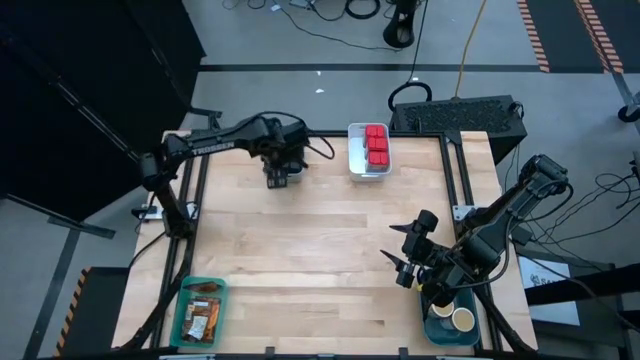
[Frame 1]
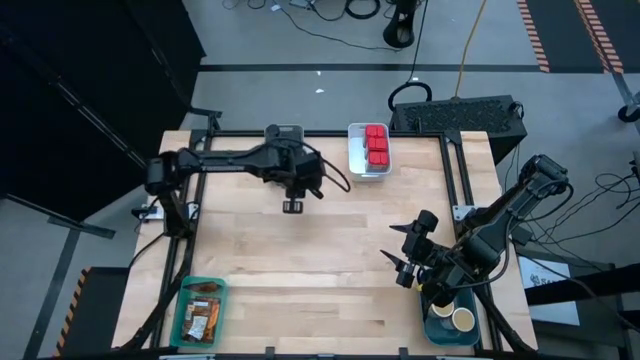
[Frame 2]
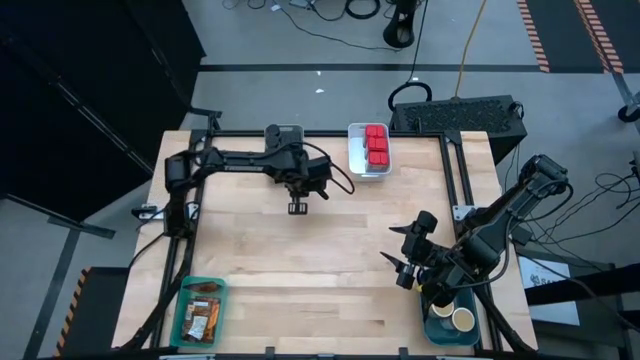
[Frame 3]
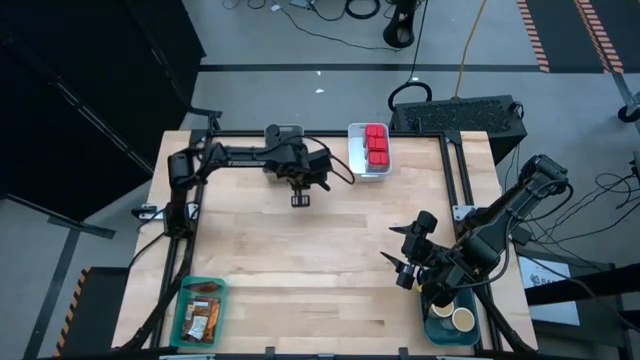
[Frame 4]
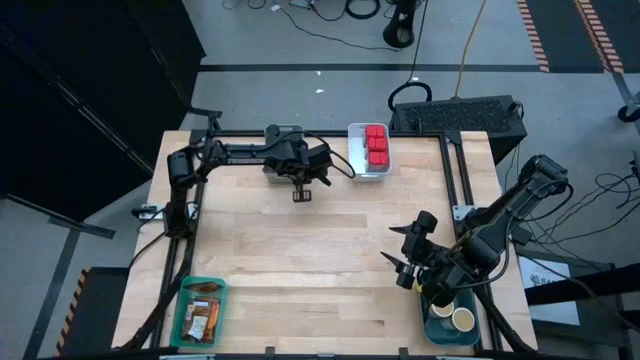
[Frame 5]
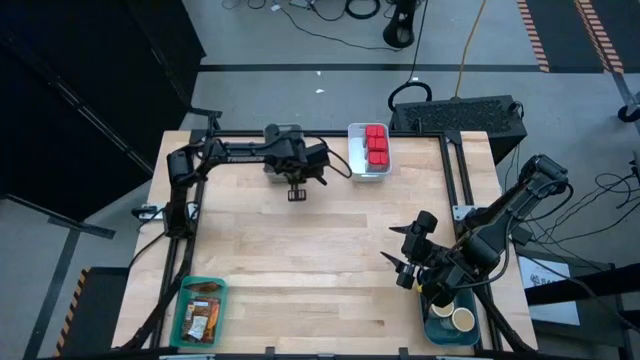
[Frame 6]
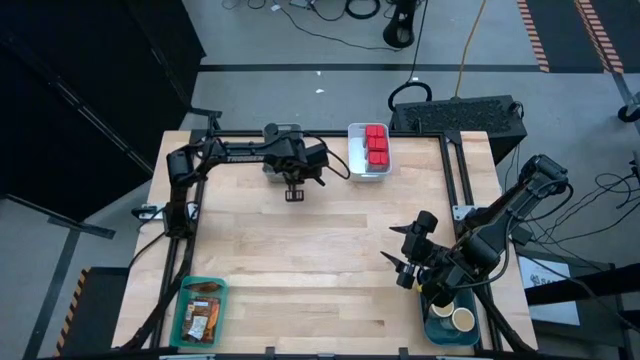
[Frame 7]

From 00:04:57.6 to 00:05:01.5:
Task: Sort spices by type
Adjust the gray bin

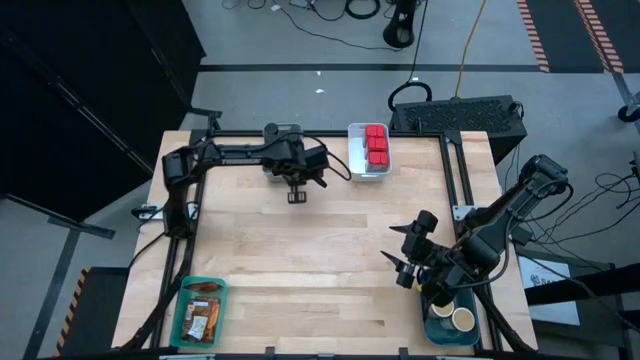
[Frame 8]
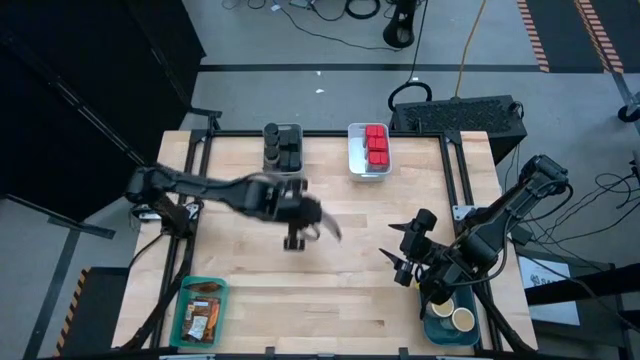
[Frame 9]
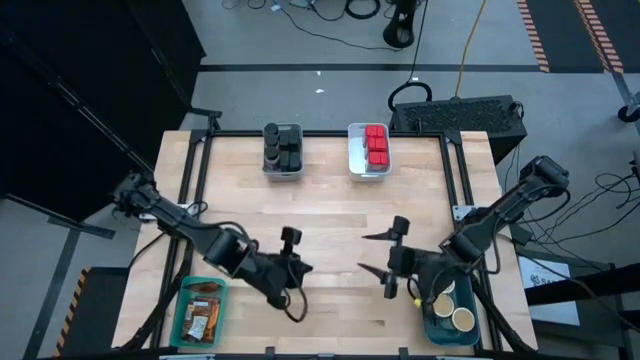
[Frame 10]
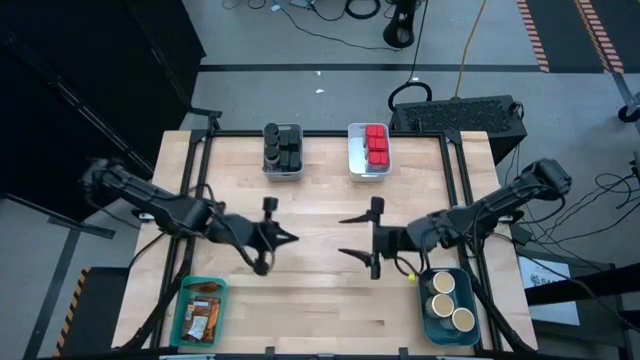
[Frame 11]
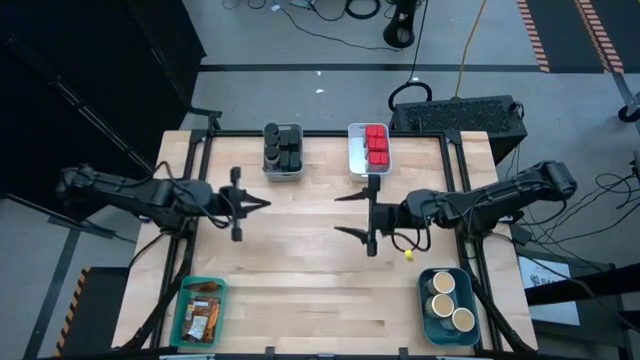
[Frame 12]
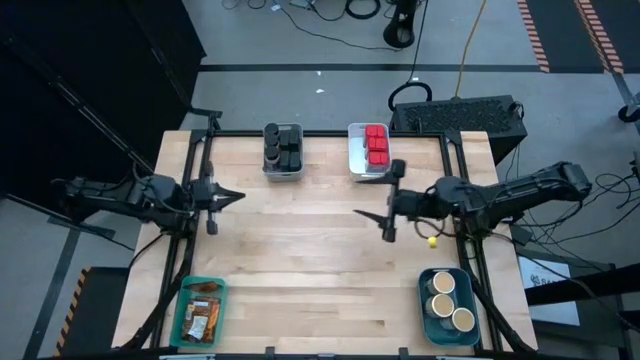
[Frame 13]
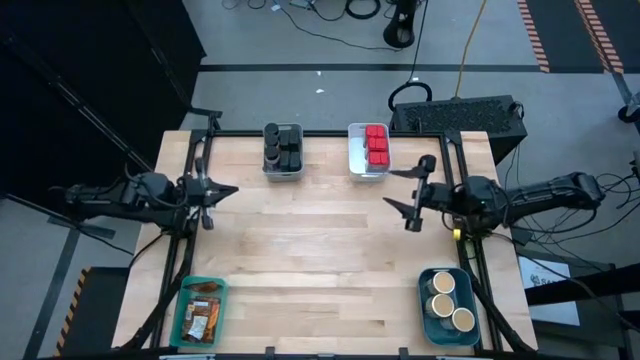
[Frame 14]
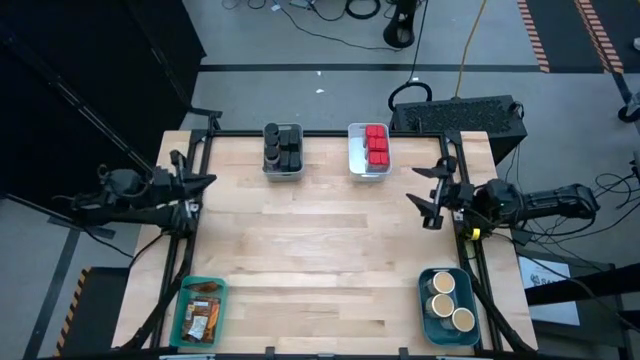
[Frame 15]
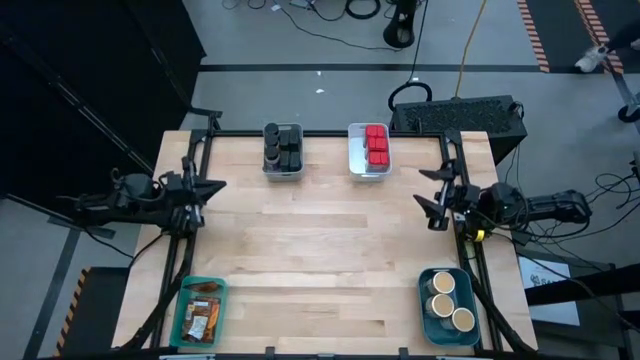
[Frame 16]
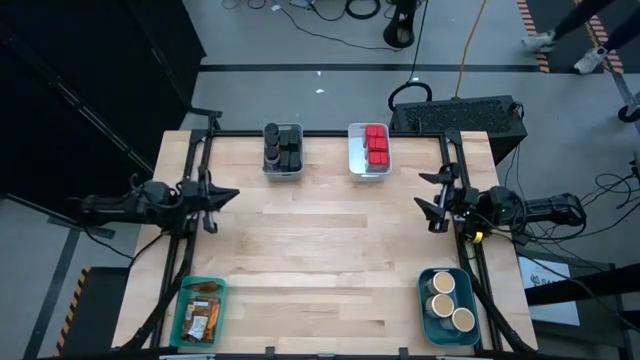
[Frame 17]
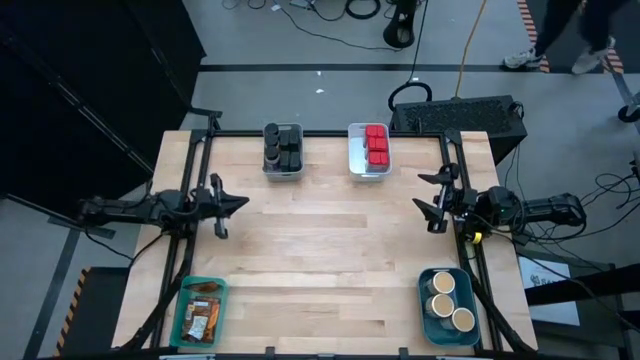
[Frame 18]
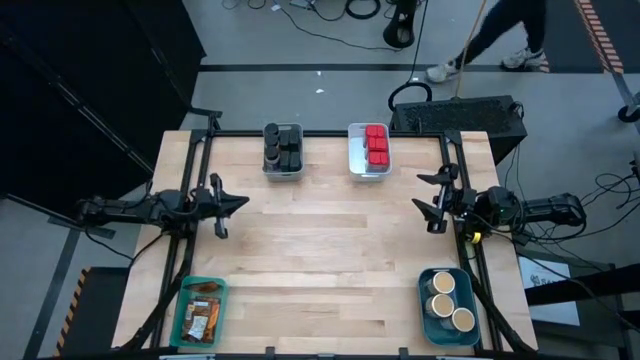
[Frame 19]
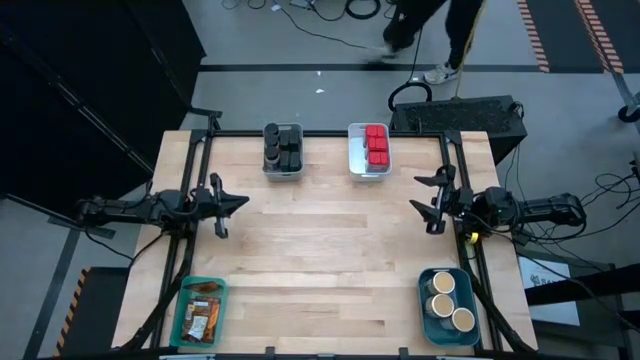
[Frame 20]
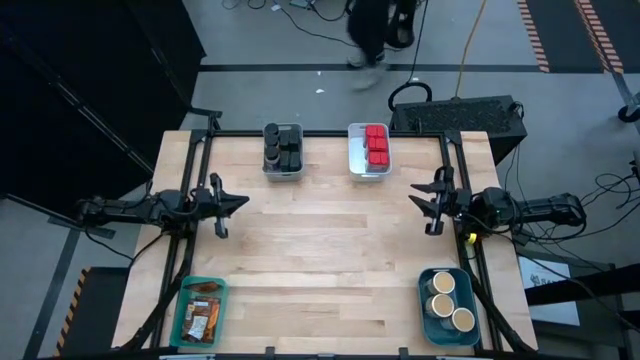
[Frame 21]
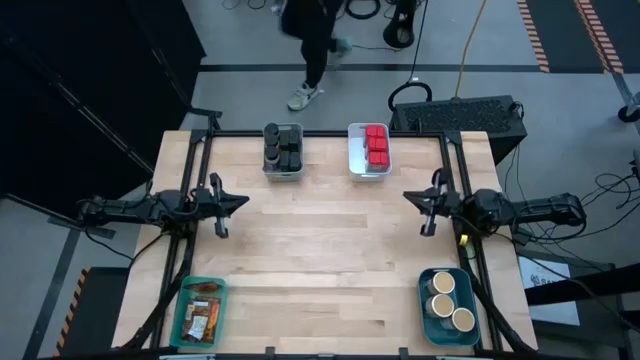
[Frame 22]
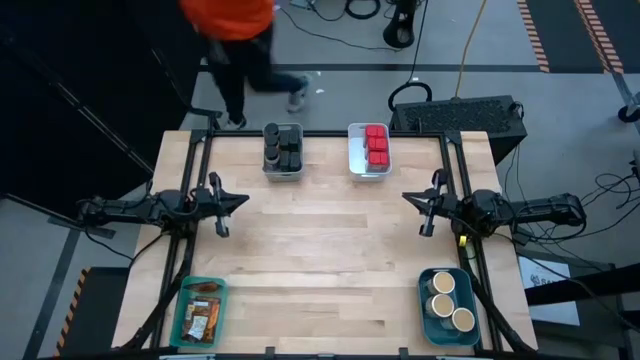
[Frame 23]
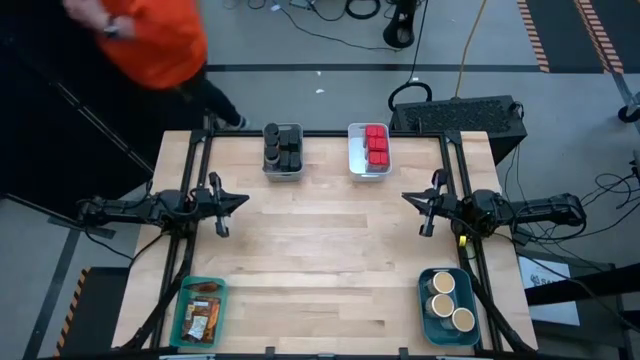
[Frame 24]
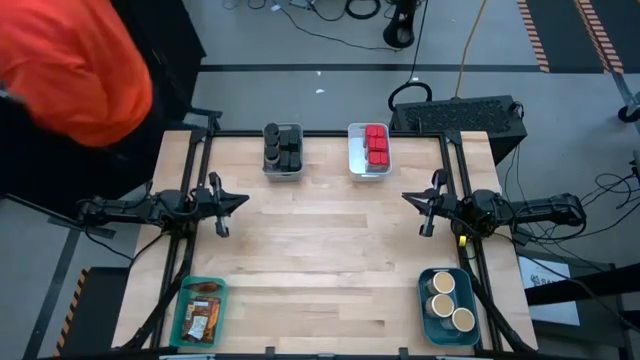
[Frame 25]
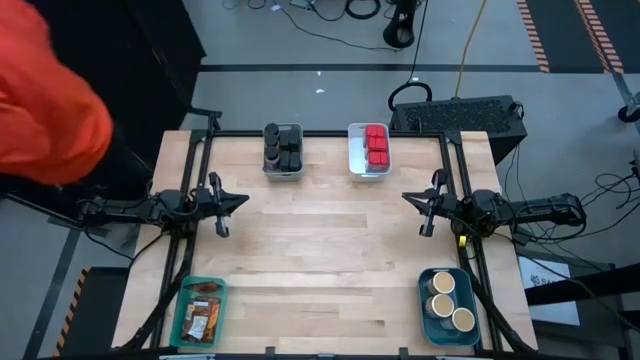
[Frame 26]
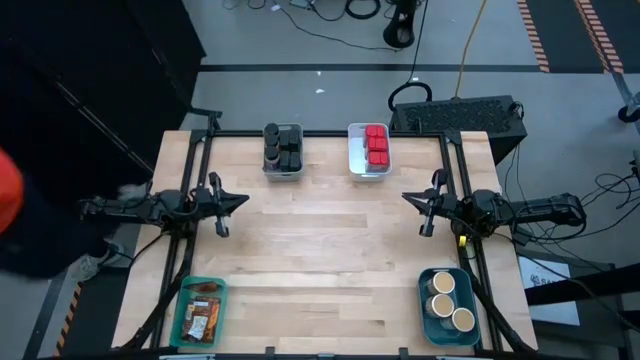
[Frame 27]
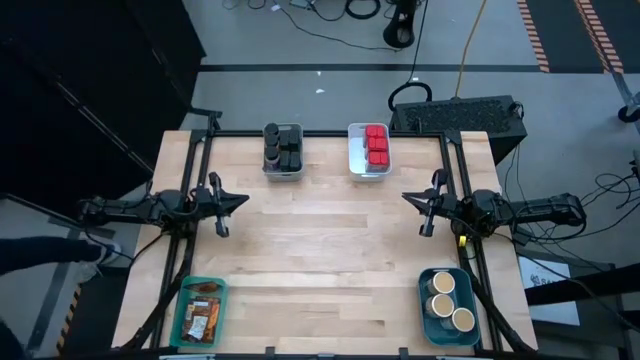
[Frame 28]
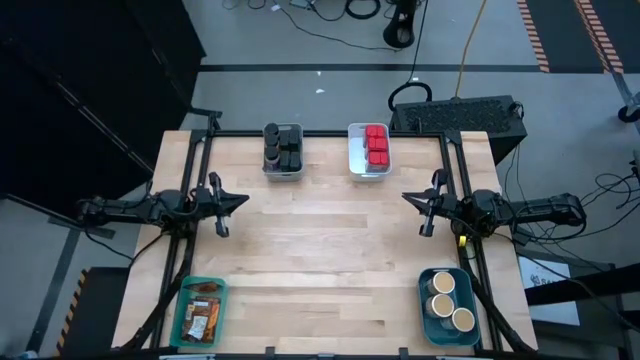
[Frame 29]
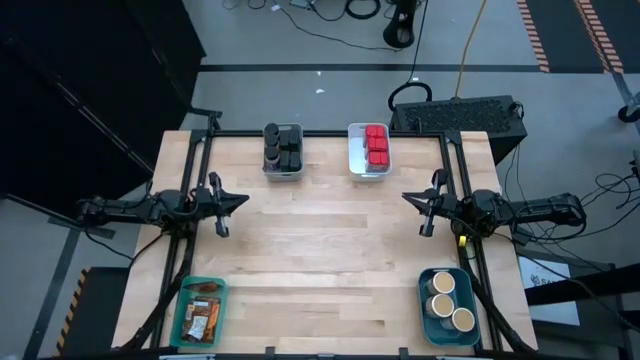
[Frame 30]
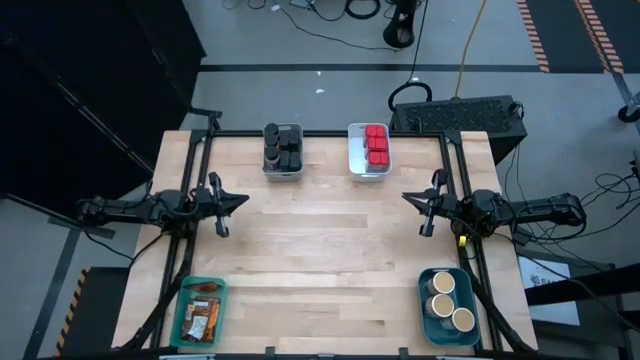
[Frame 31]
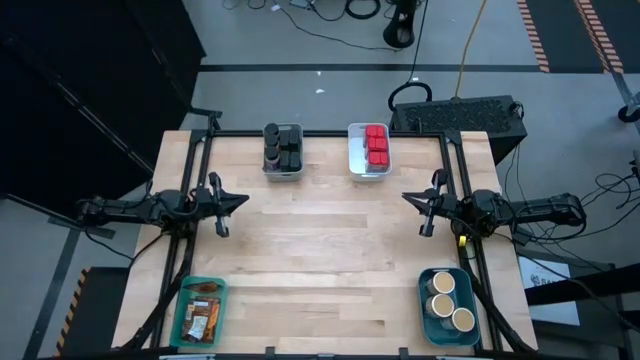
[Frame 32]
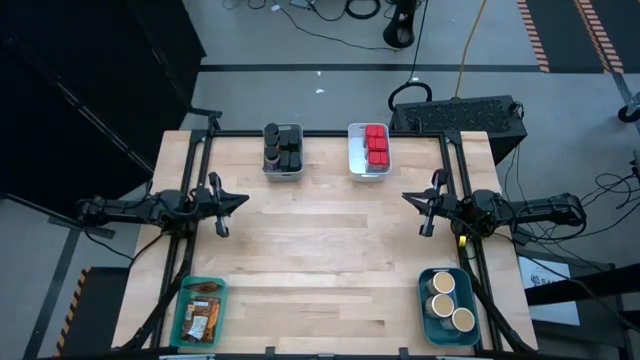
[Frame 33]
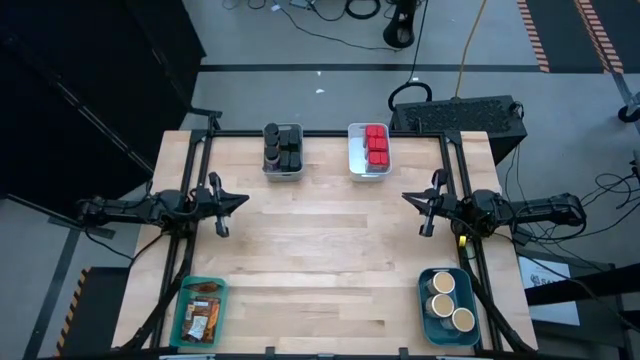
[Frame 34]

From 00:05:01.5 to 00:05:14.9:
Return to Home Position

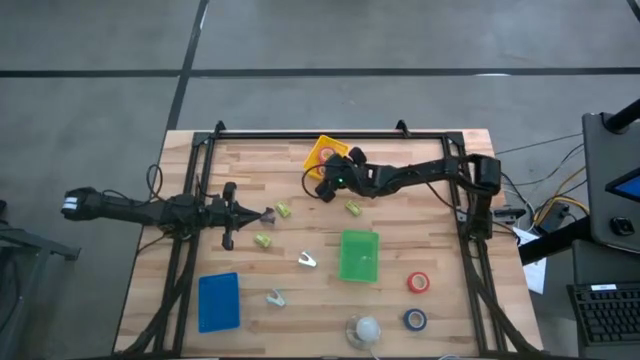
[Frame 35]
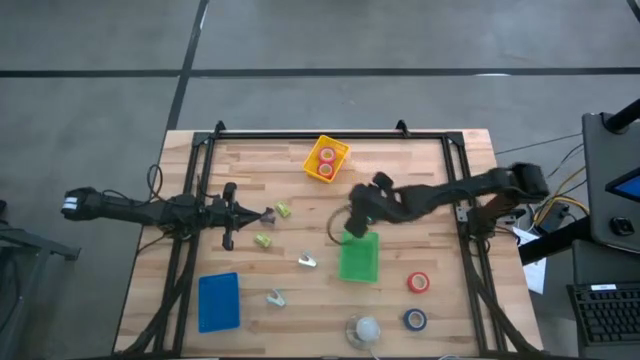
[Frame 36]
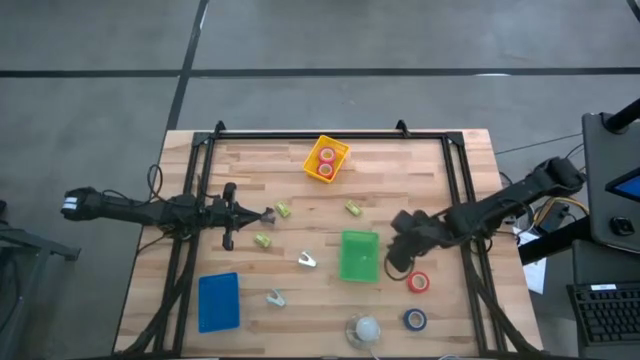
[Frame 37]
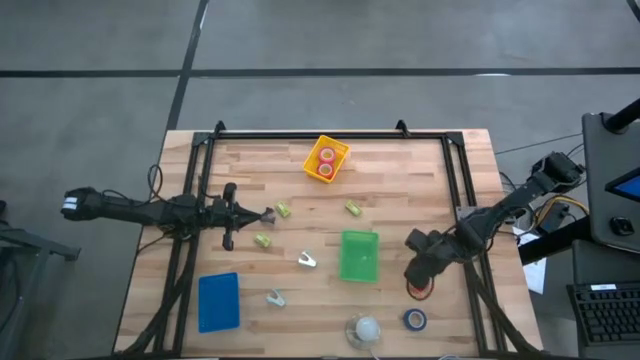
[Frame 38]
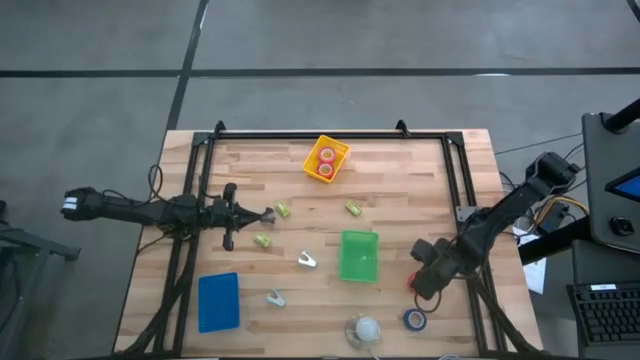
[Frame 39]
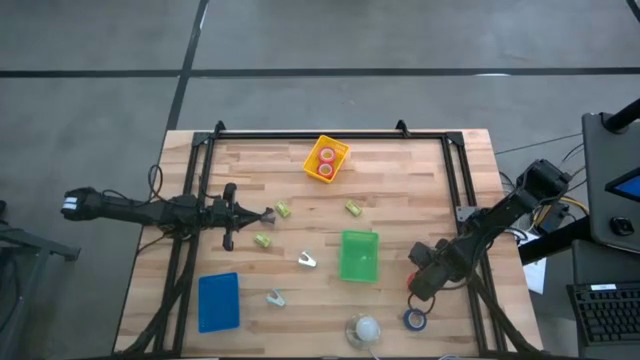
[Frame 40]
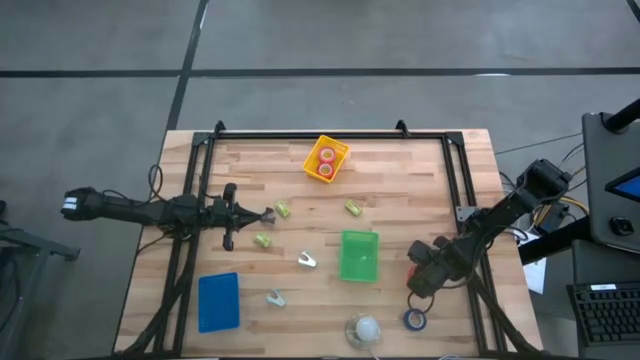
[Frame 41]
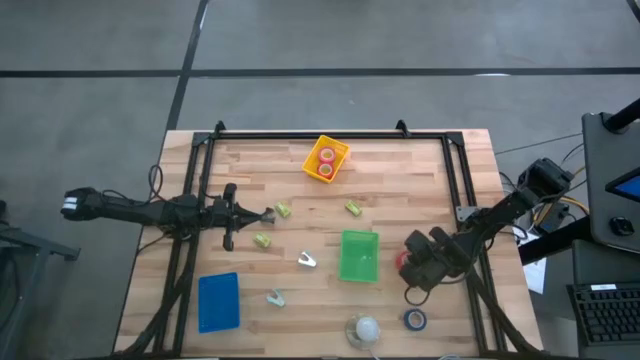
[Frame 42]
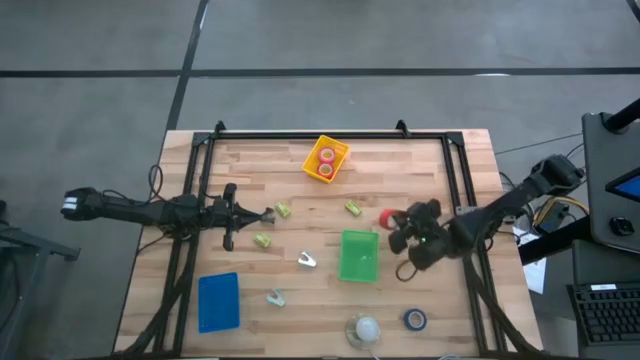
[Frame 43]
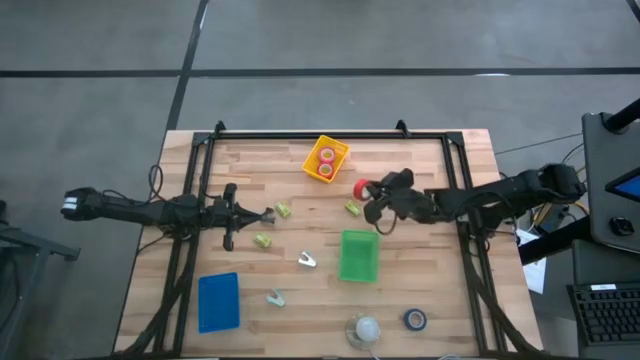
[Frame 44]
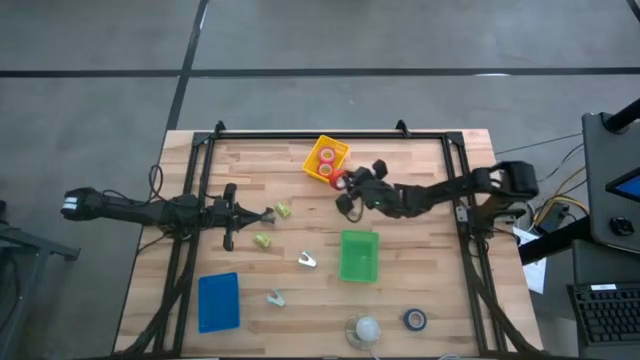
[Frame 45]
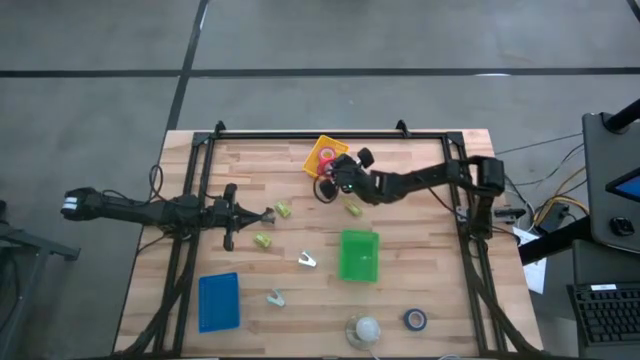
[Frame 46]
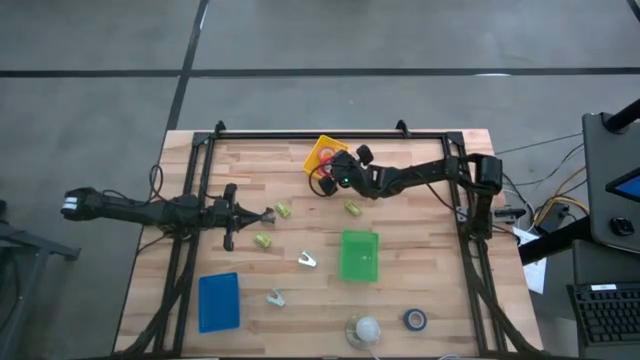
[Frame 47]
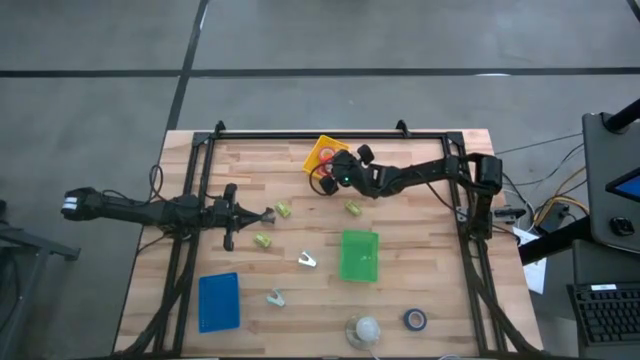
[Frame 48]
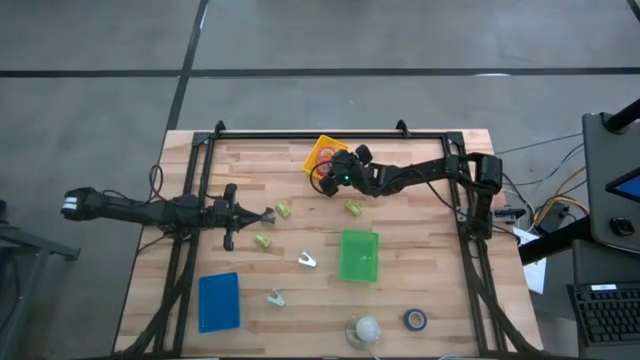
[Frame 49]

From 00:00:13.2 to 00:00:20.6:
Task: Pick and place Stapler, Stapler remover, tape
Put the orange tape into the yellow bin
